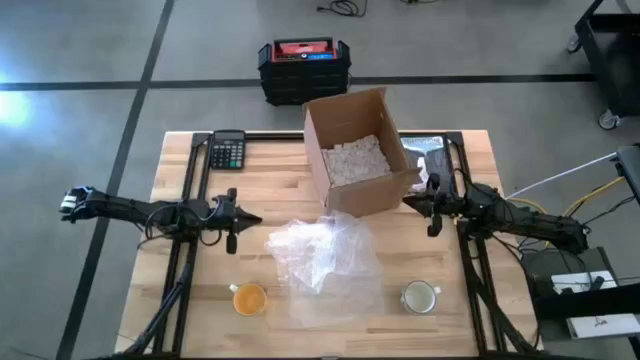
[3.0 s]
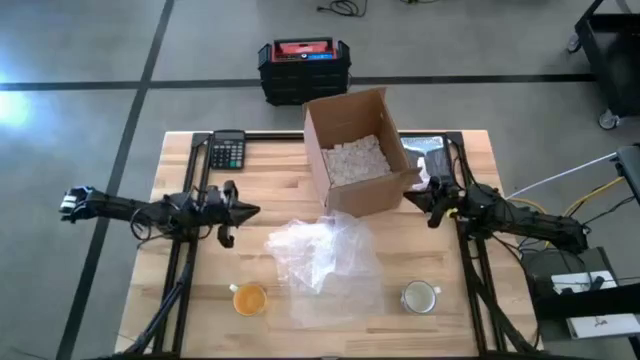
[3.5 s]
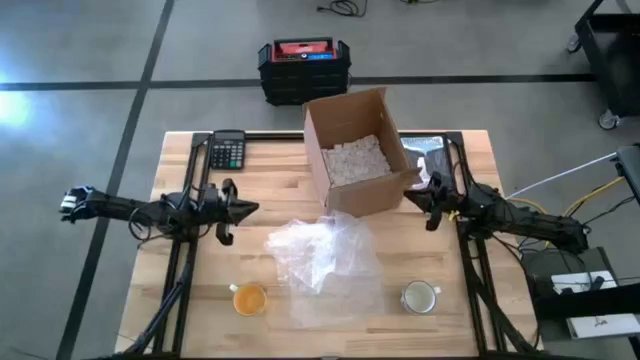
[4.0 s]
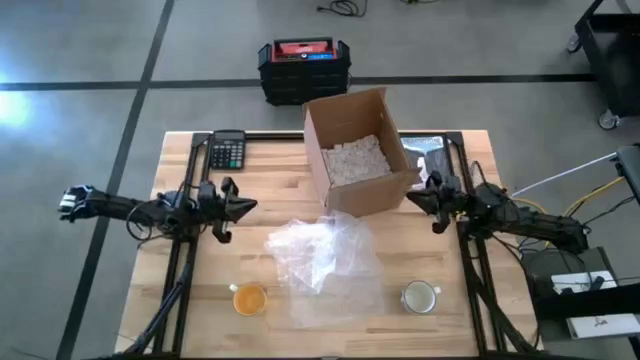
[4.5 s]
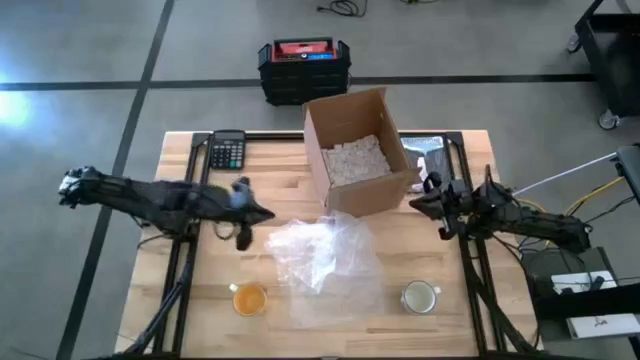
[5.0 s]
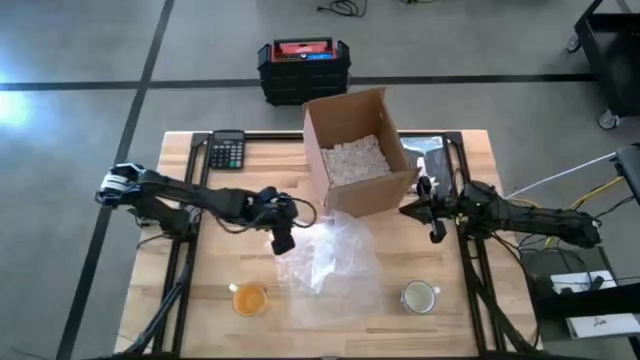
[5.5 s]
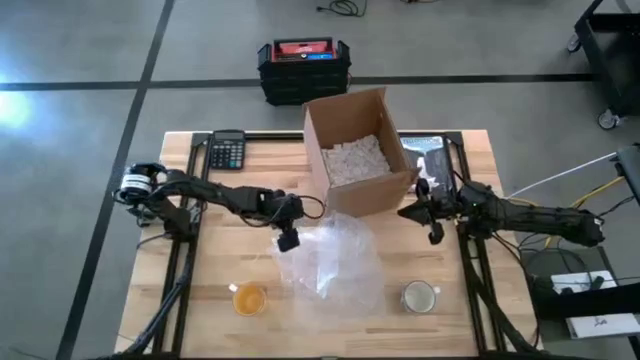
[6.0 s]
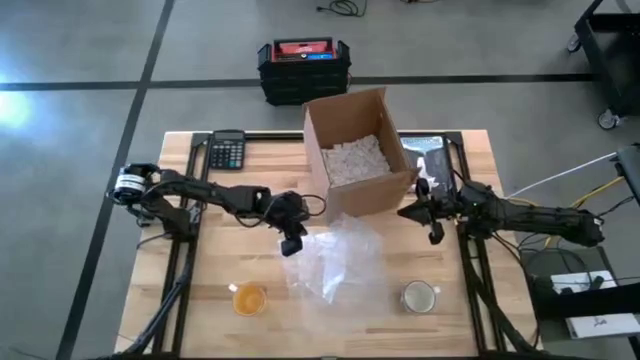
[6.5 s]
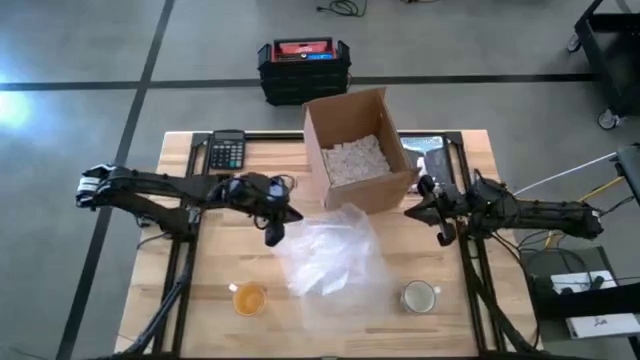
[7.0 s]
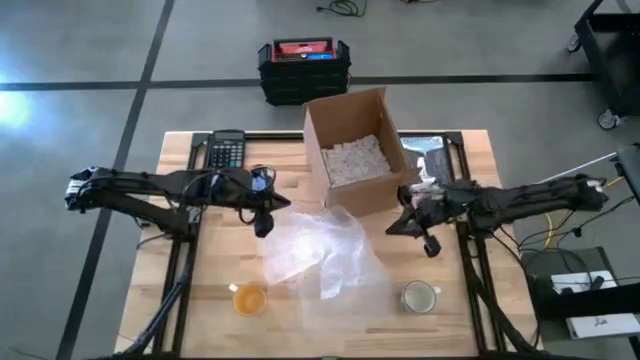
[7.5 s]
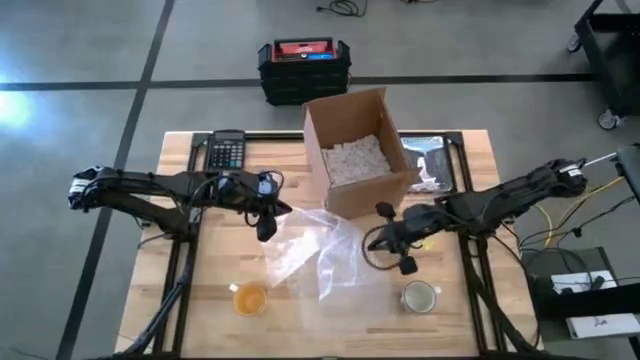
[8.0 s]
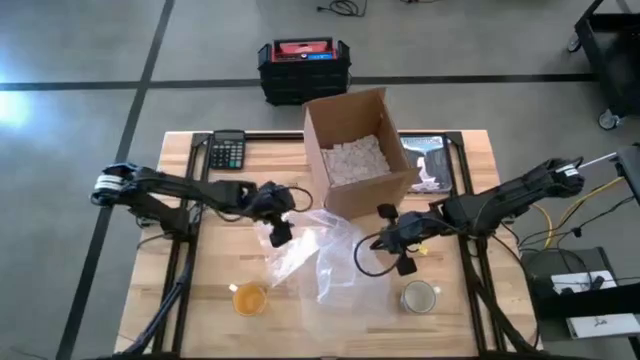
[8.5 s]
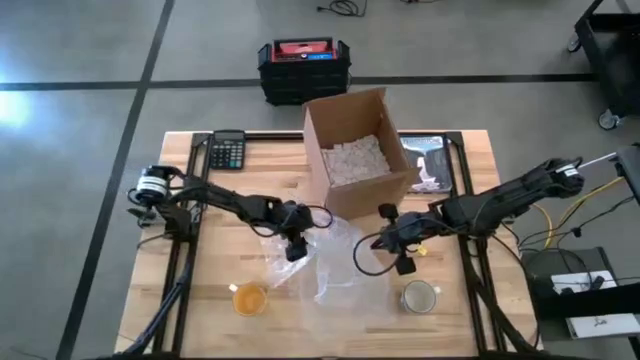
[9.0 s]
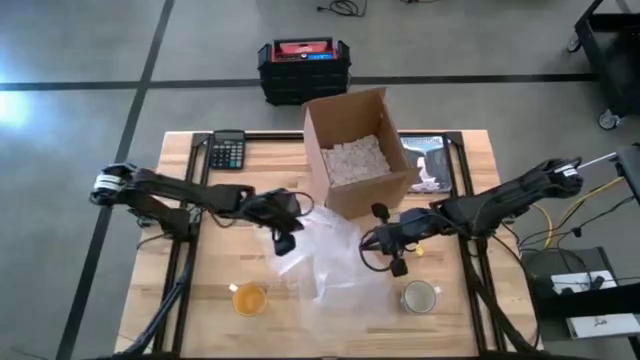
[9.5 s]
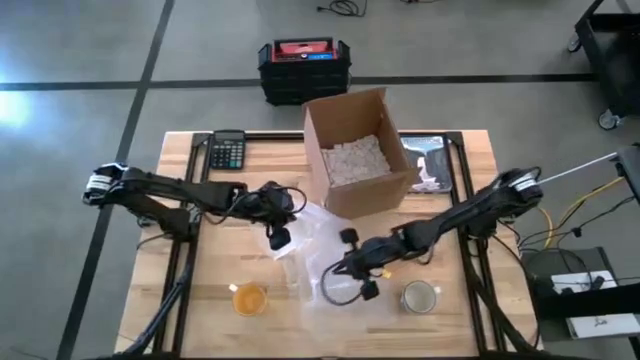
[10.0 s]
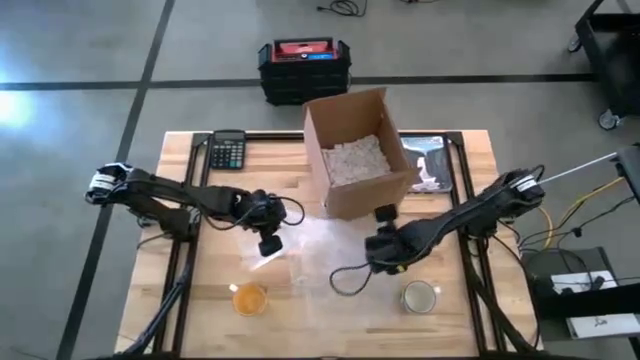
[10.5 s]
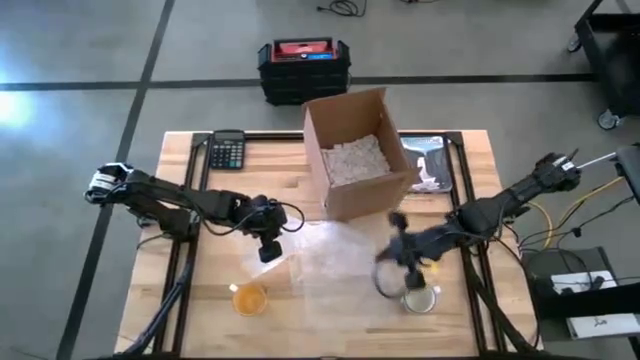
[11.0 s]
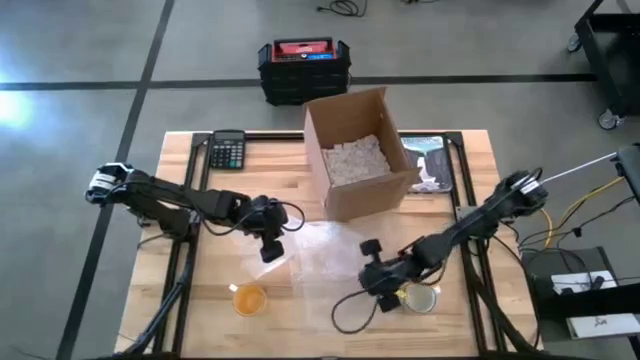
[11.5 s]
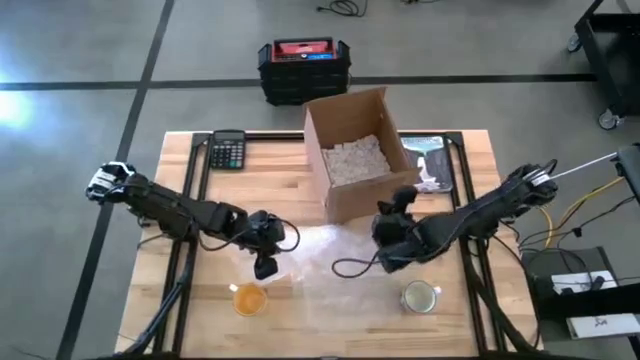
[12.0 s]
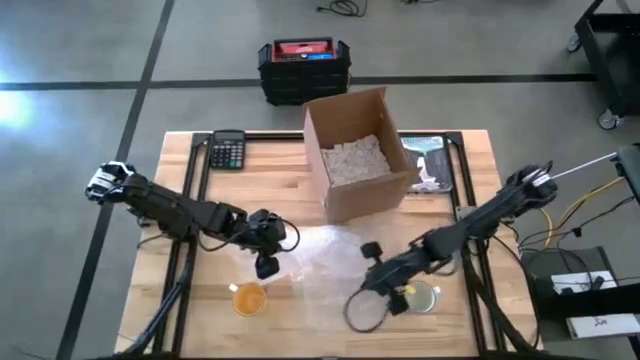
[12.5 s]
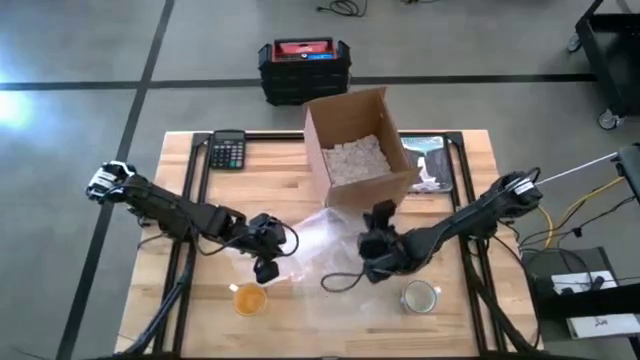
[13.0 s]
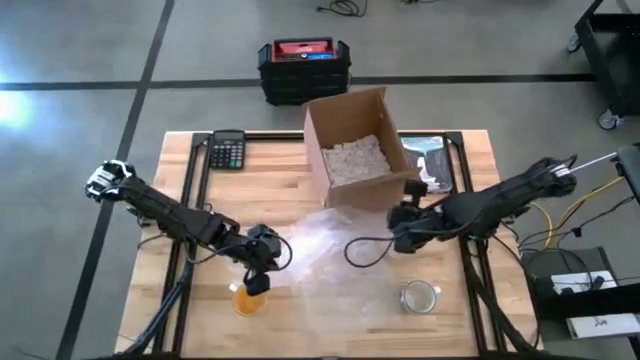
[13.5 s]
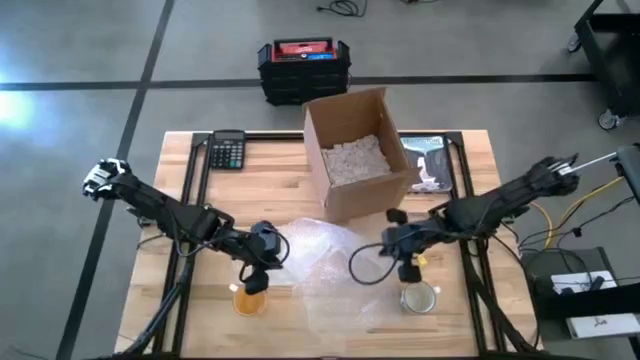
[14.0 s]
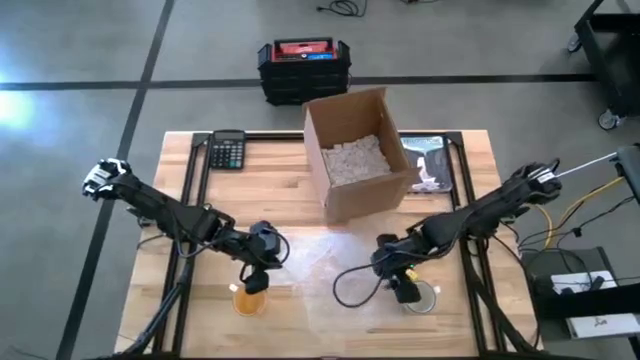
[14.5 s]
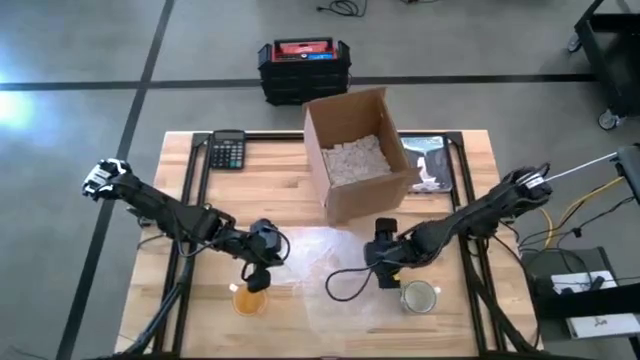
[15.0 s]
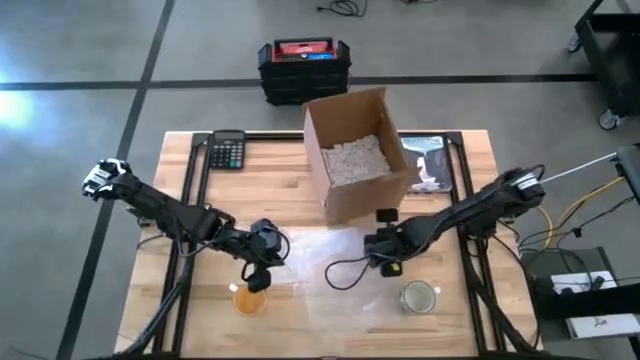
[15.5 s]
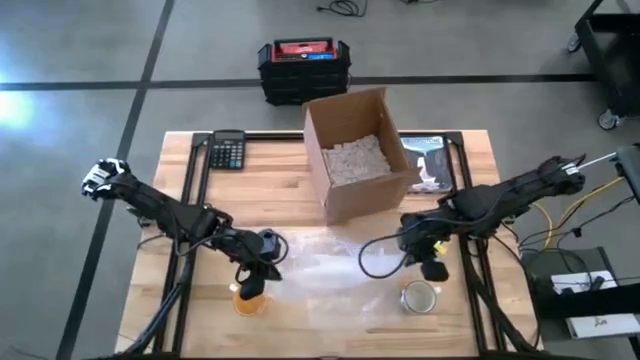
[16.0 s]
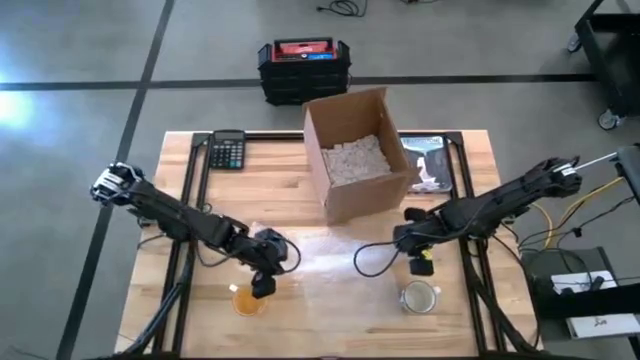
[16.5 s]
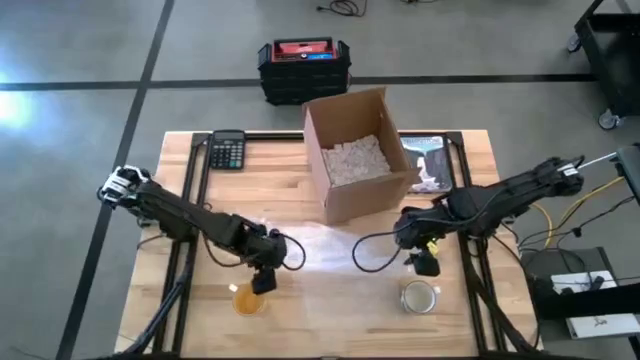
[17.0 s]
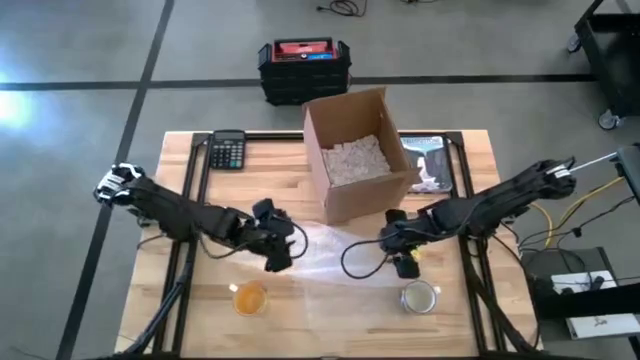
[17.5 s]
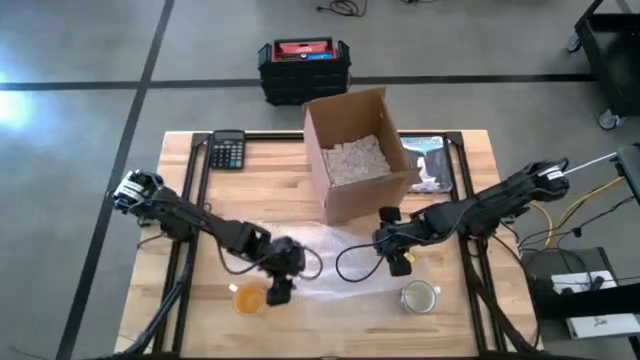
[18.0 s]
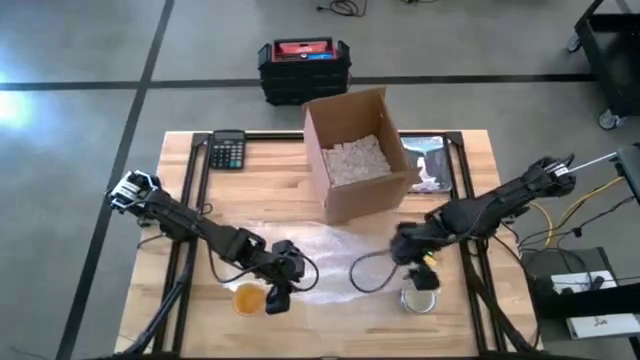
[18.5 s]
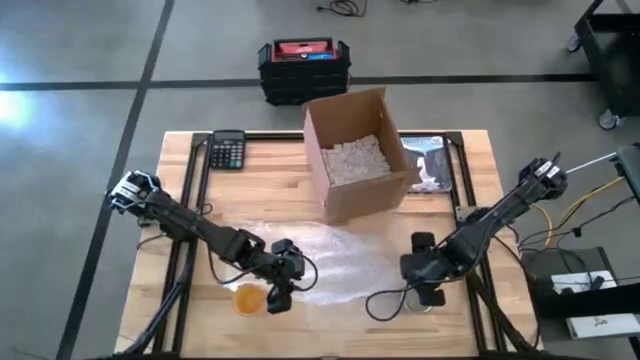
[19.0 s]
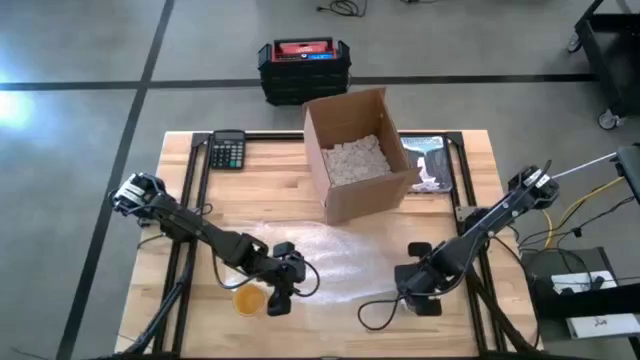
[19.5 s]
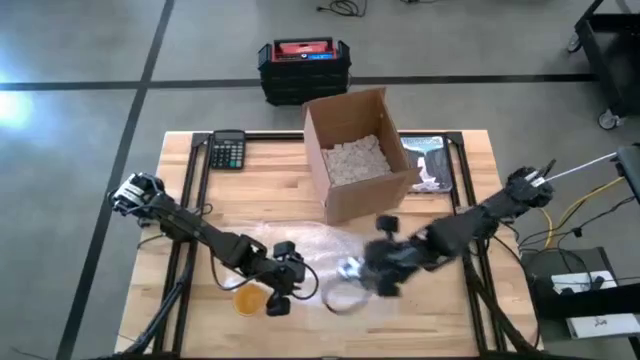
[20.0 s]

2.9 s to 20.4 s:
Task: wrap mug
Wrap the white cup in bubble wrap
